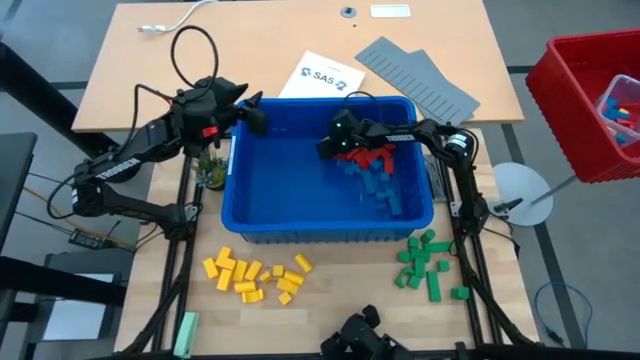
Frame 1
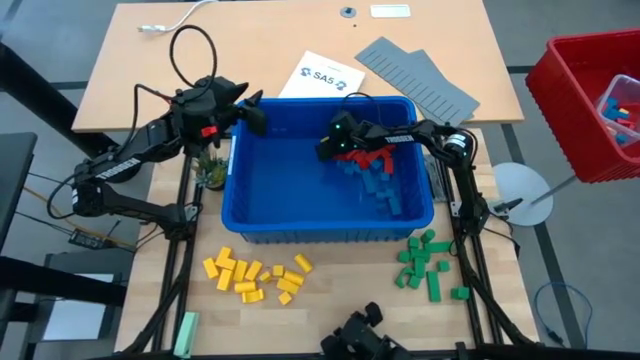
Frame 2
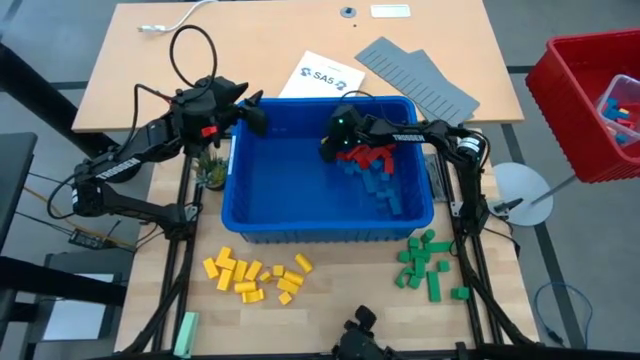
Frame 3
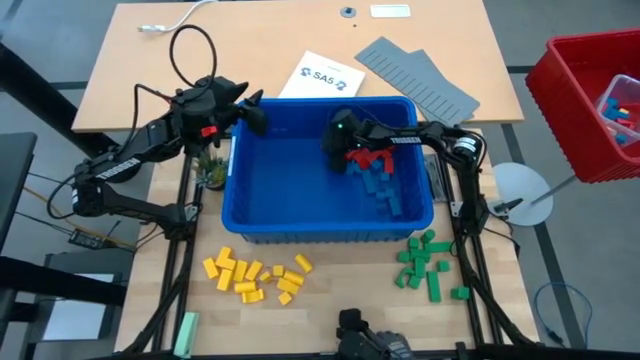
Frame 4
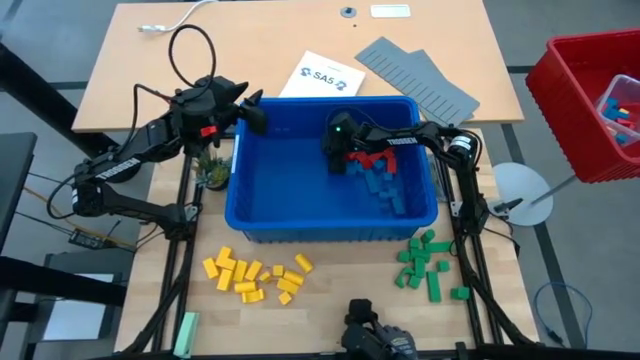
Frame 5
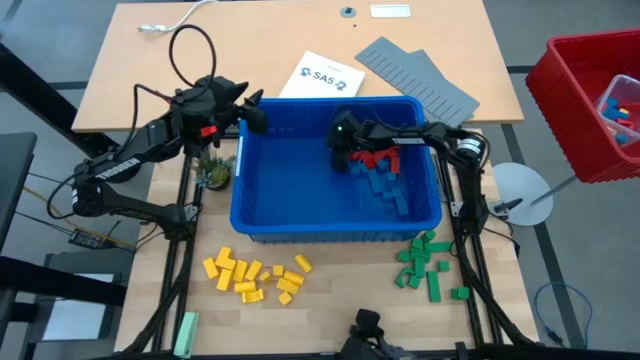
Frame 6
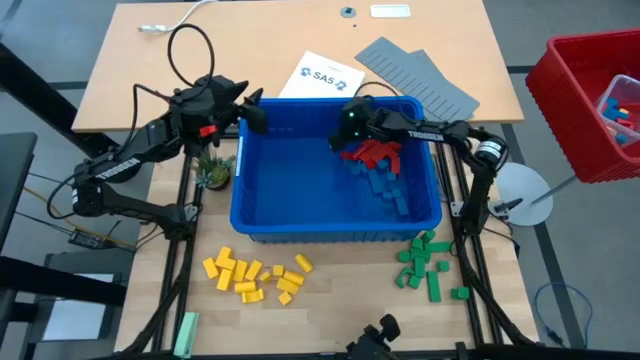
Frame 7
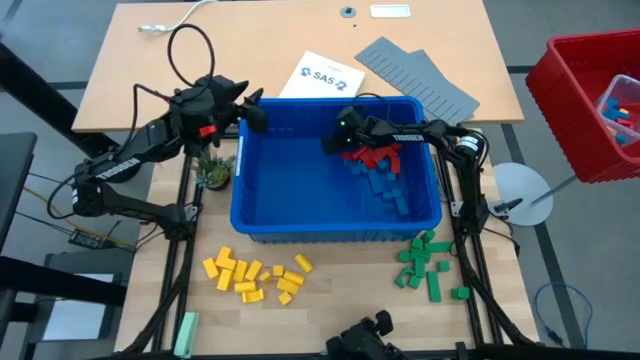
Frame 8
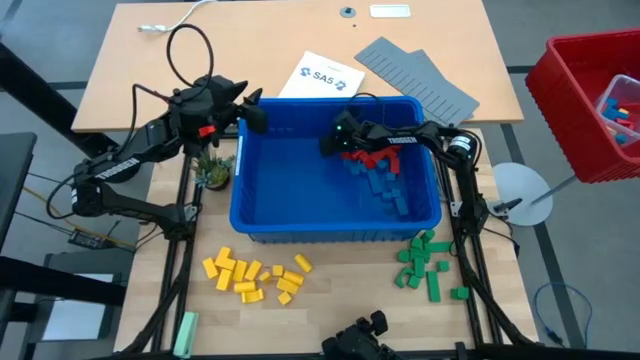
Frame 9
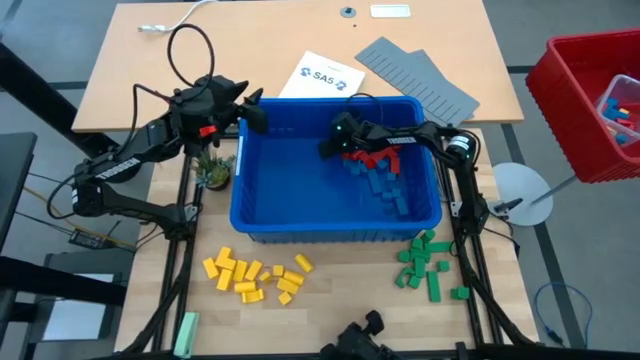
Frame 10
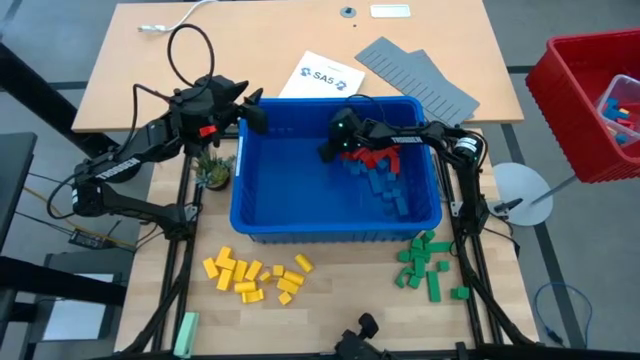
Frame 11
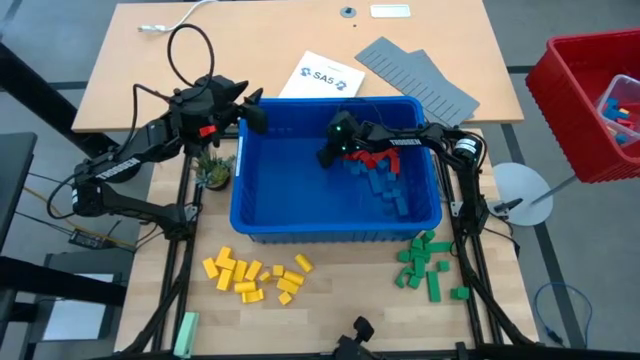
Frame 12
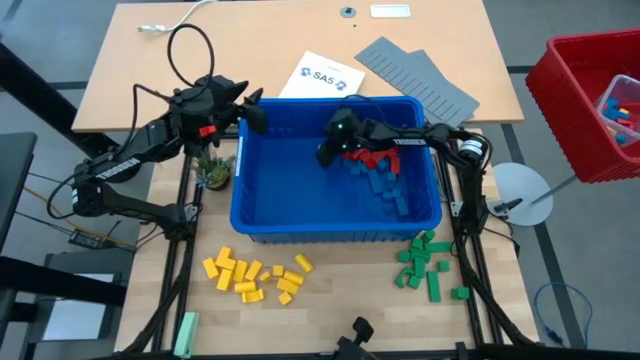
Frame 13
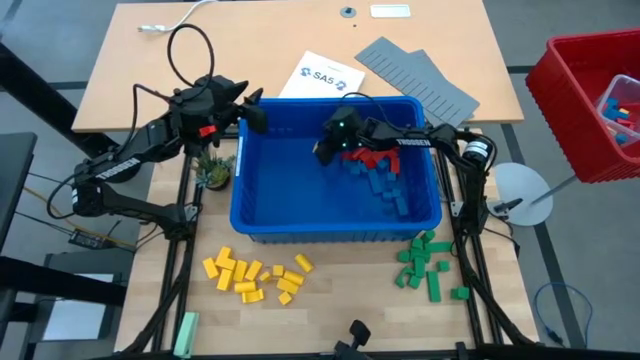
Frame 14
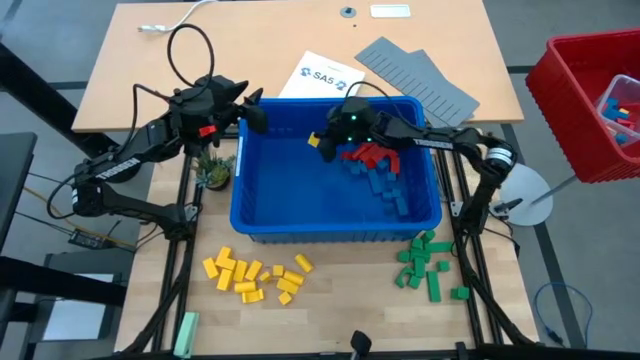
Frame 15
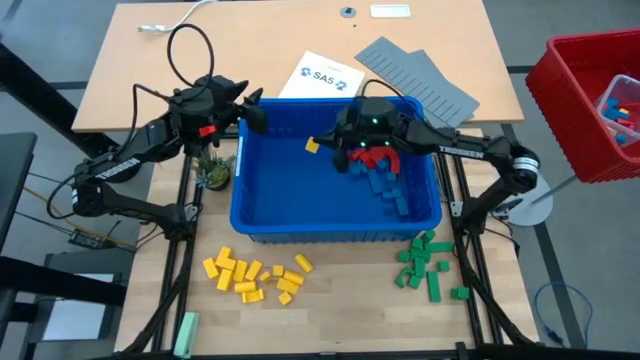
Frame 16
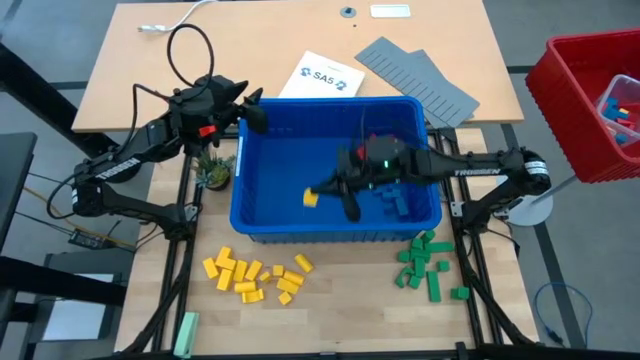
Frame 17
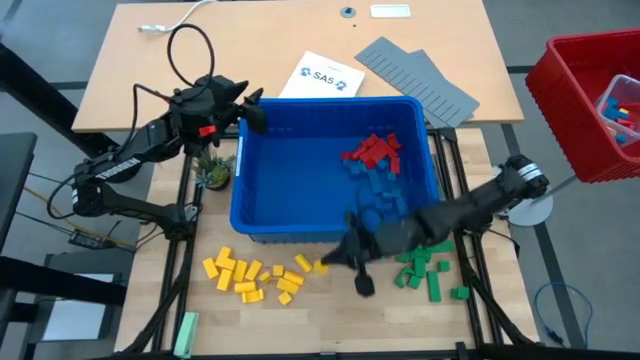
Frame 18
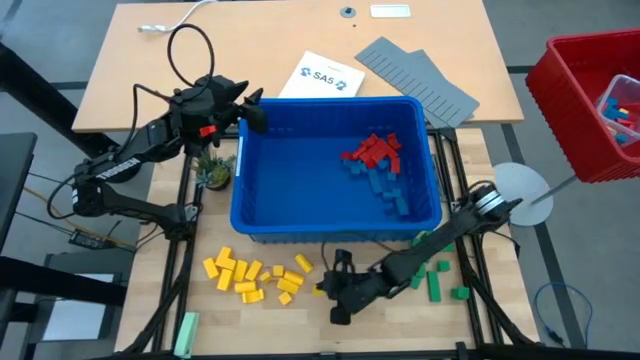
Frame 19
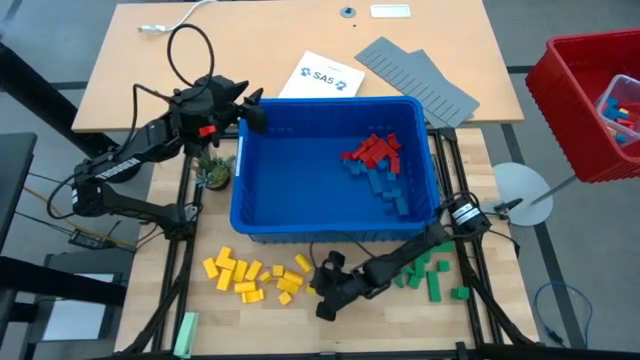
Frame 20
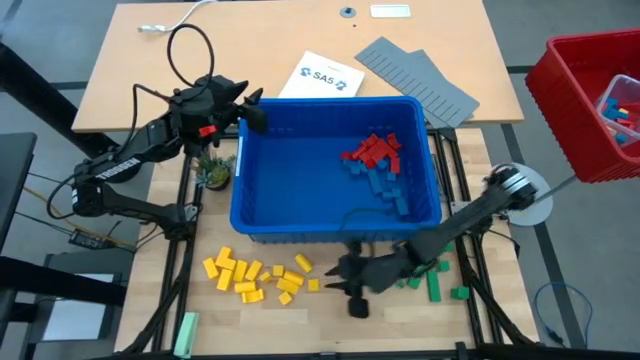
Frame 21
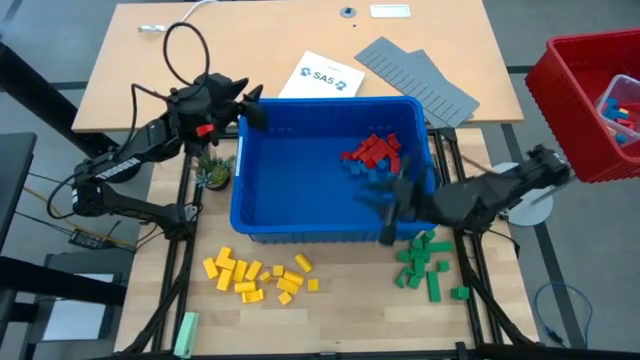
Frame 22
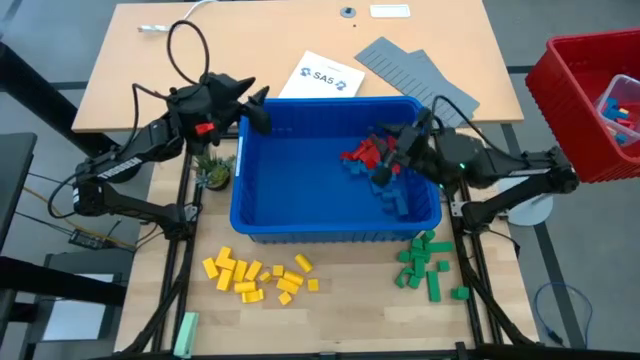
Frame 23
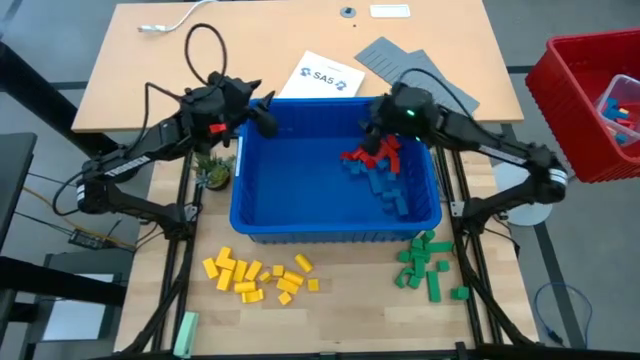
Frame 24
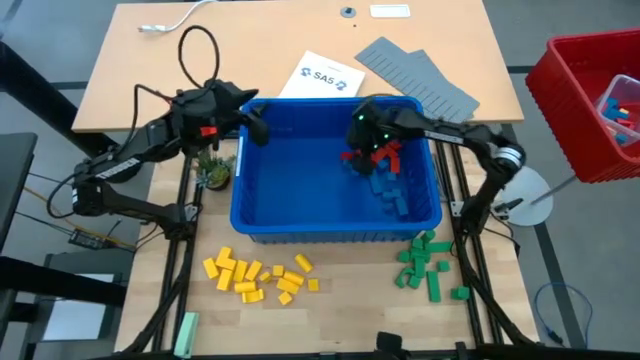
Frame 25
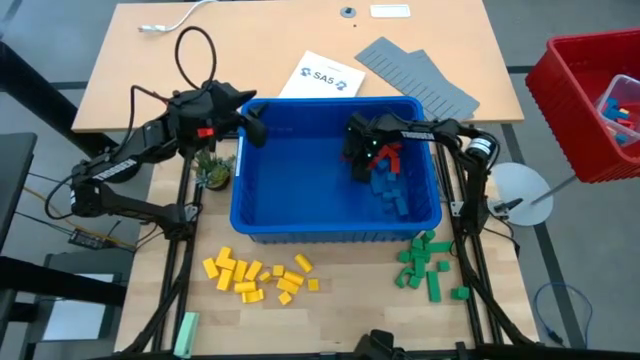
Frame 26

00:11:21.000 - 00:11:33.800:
Task: Sort blocks
Remove the yellow block from the blue bin

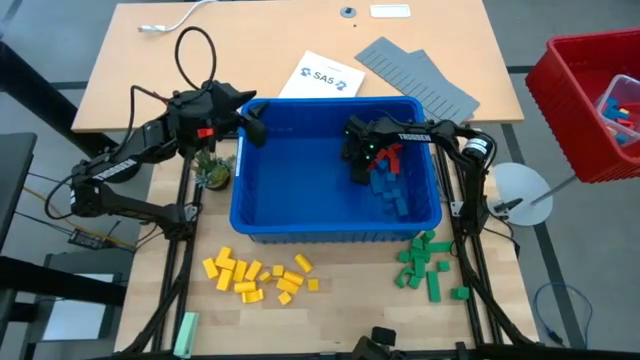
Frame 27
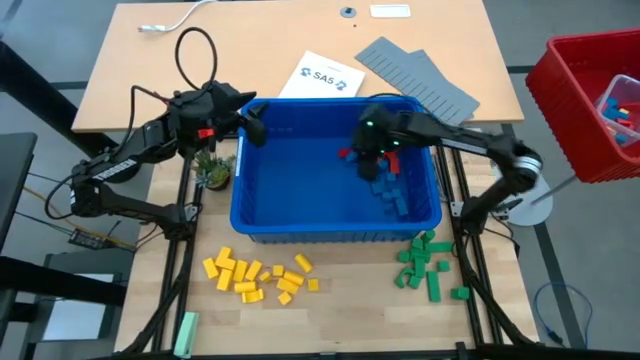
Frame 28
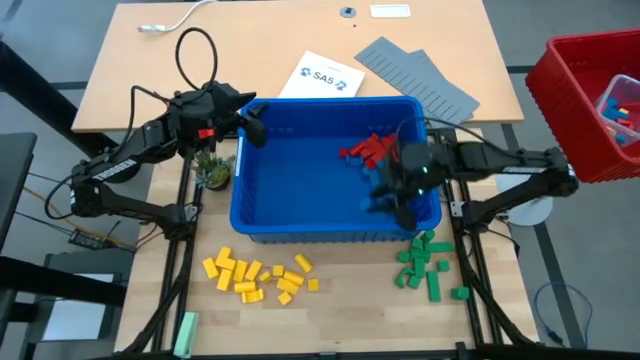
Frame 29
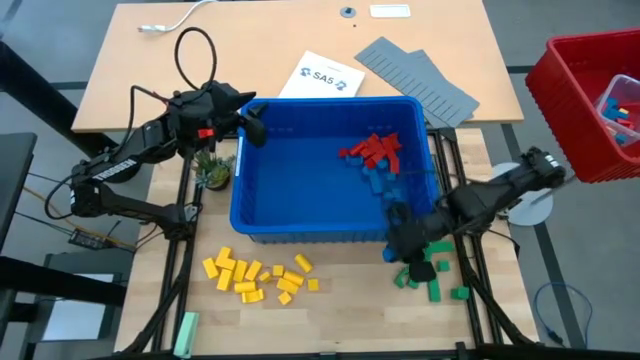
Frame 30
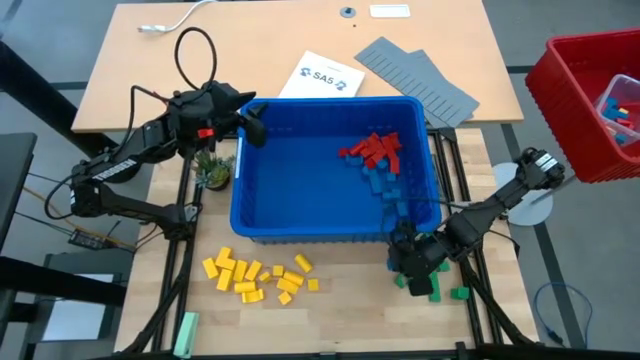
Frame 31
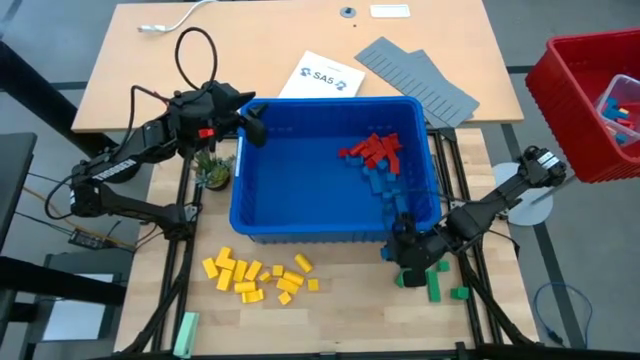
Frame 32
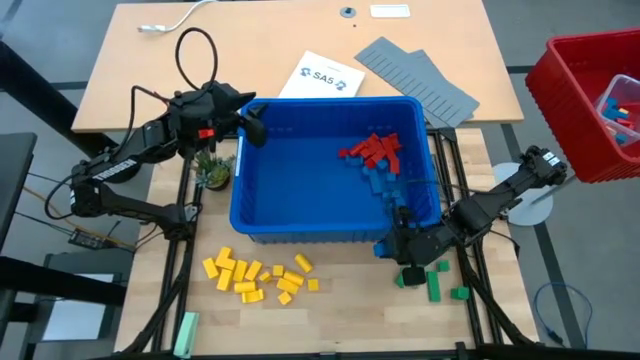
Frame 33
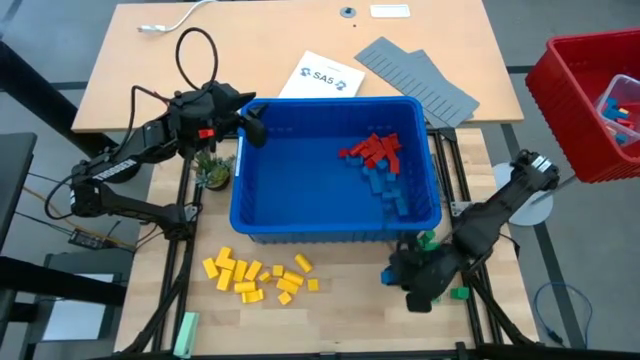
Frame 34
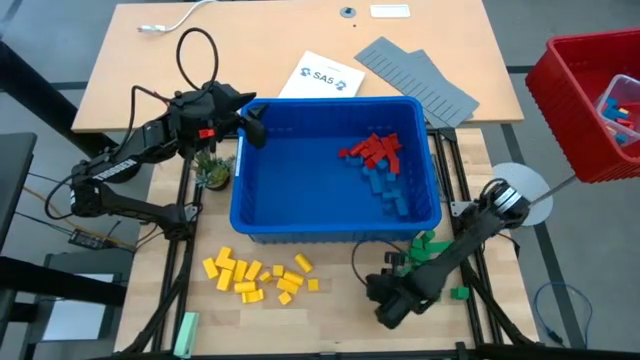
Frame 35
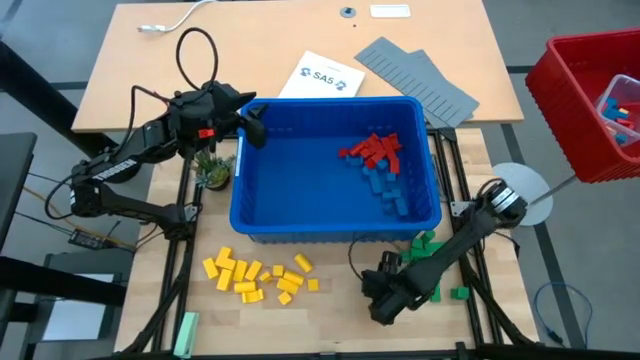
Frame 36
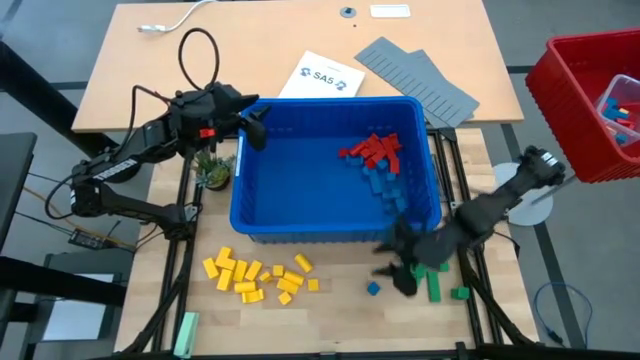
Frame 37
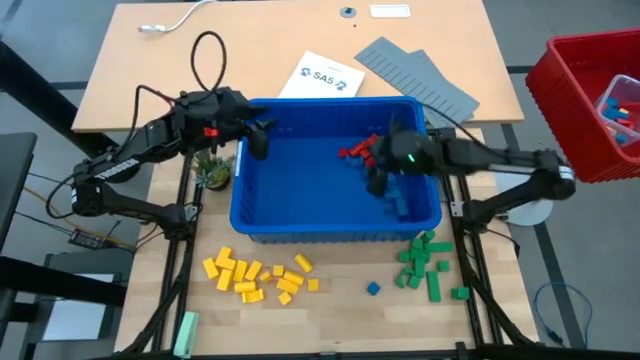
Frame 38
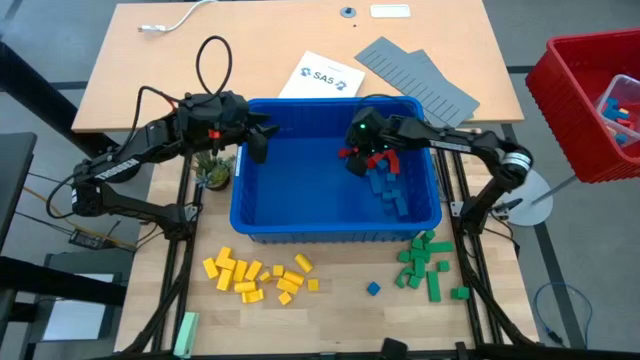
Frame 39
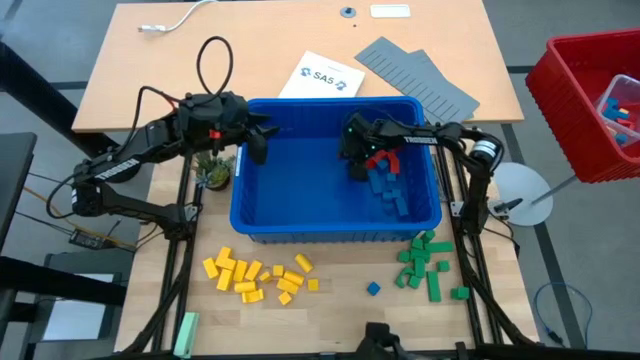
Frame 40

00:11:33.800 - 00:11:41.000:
Remove the blue block from the blue bin
